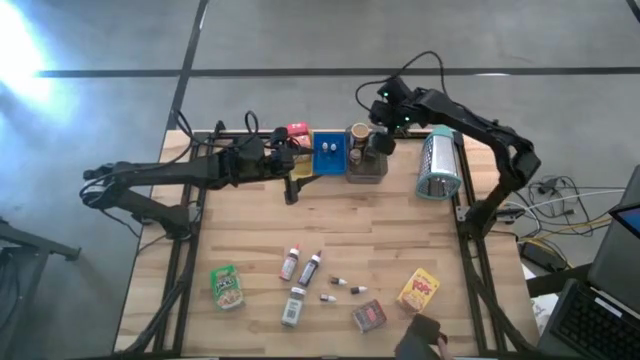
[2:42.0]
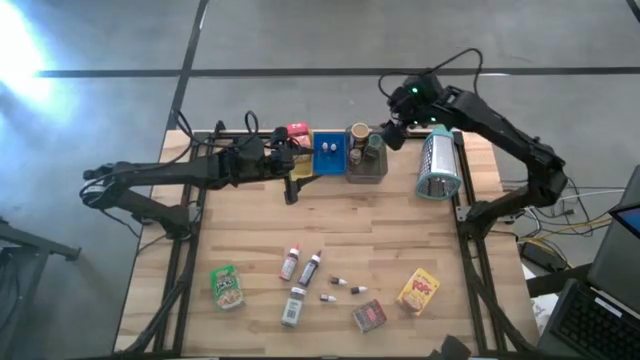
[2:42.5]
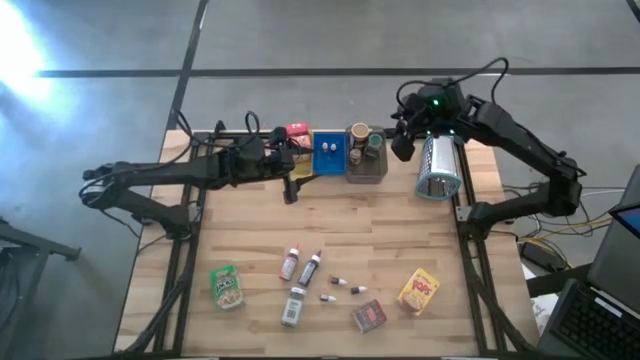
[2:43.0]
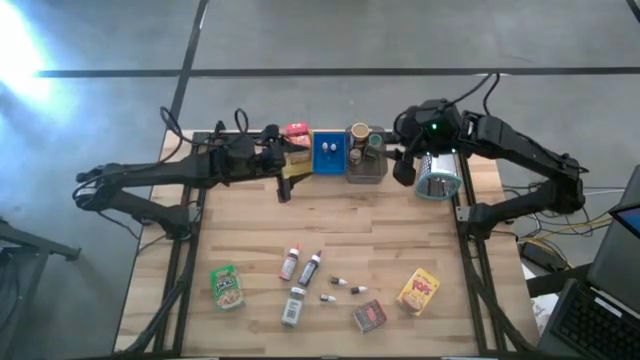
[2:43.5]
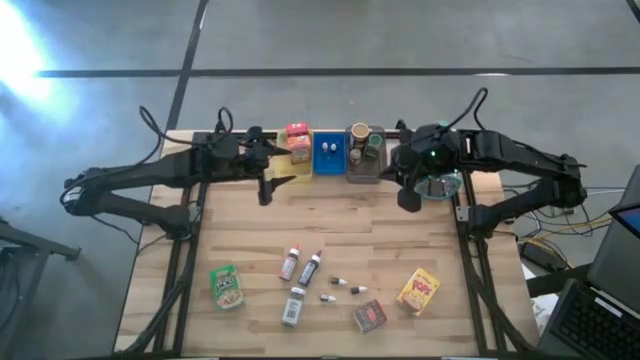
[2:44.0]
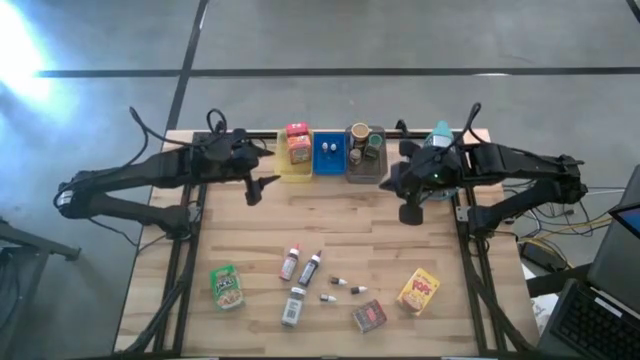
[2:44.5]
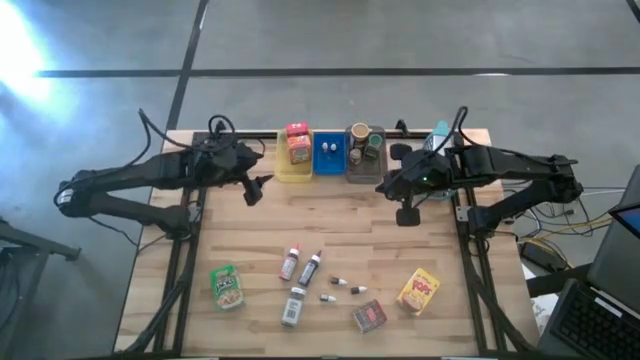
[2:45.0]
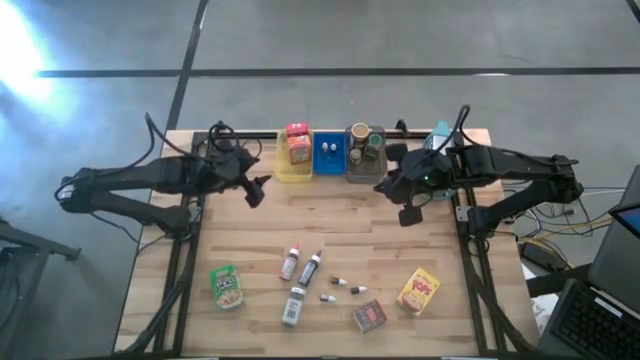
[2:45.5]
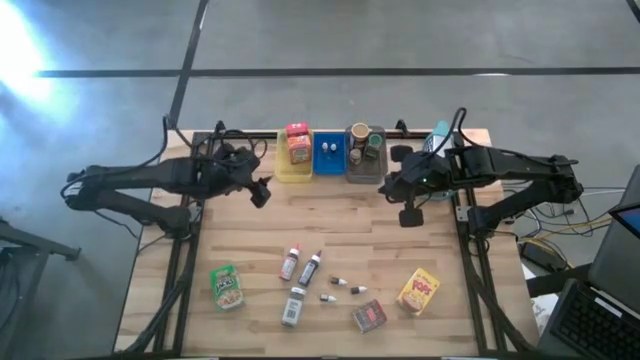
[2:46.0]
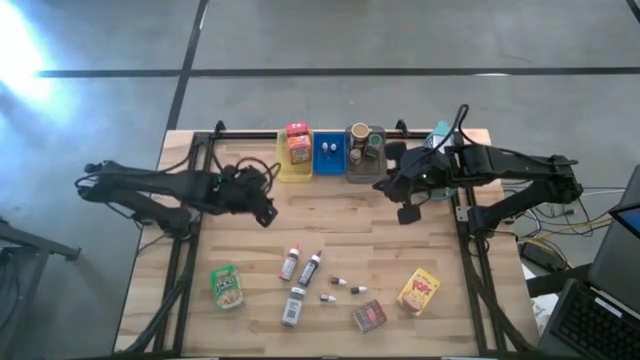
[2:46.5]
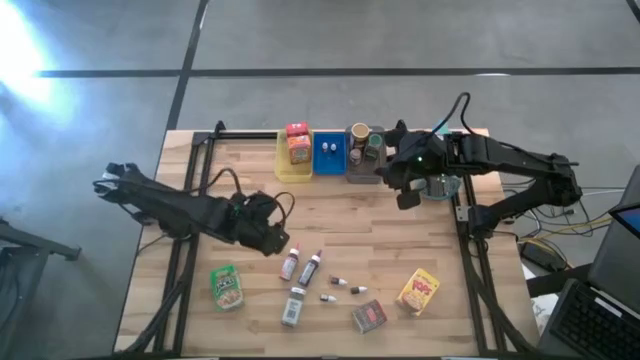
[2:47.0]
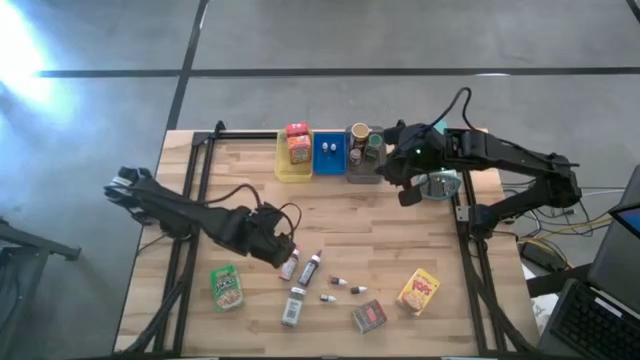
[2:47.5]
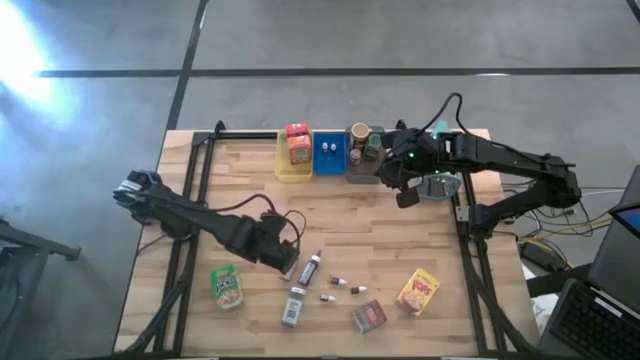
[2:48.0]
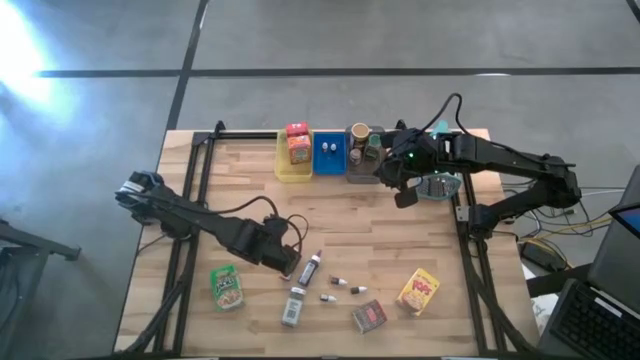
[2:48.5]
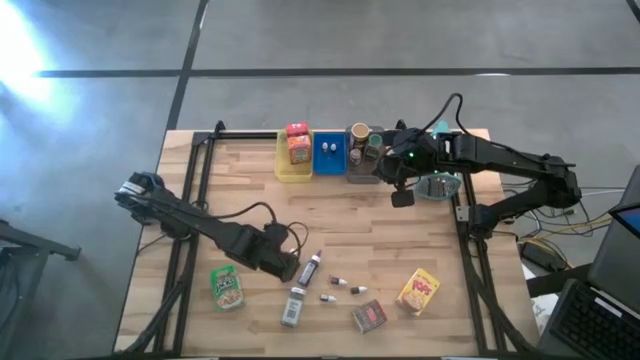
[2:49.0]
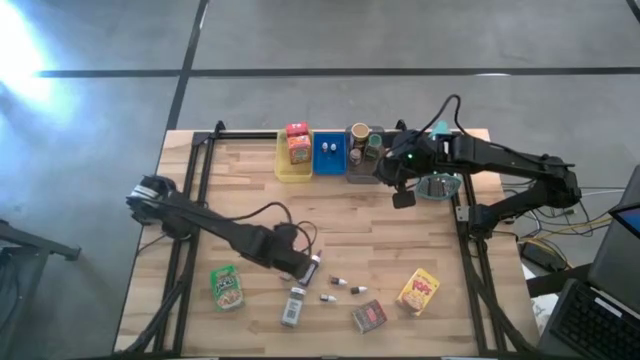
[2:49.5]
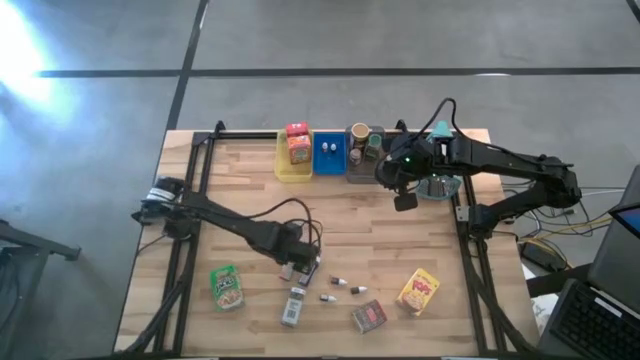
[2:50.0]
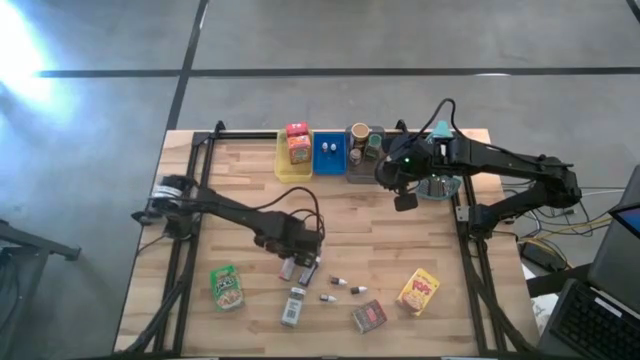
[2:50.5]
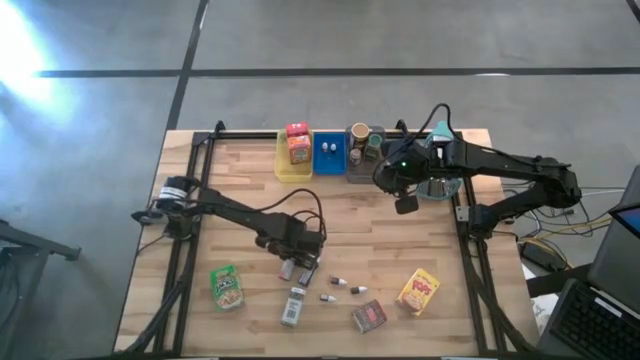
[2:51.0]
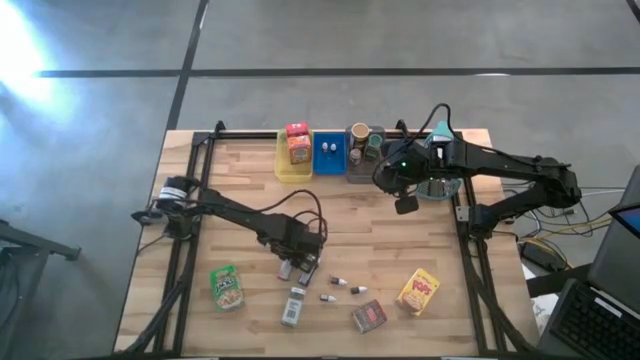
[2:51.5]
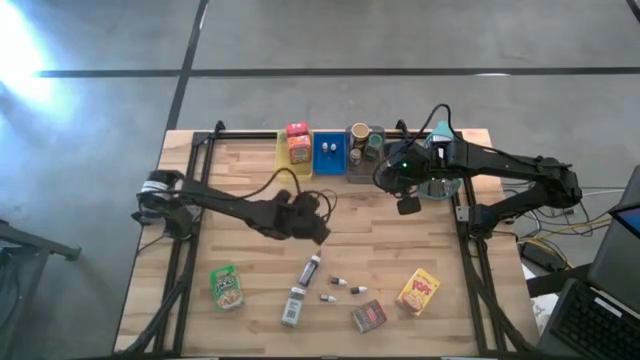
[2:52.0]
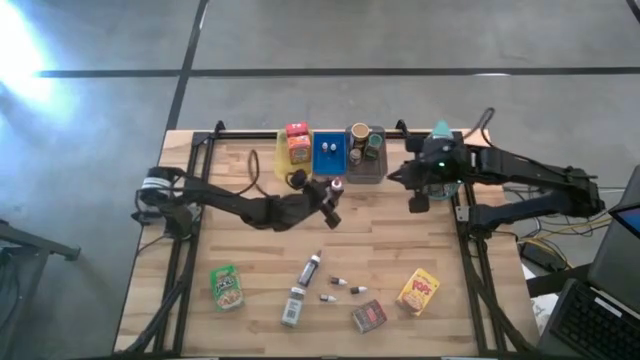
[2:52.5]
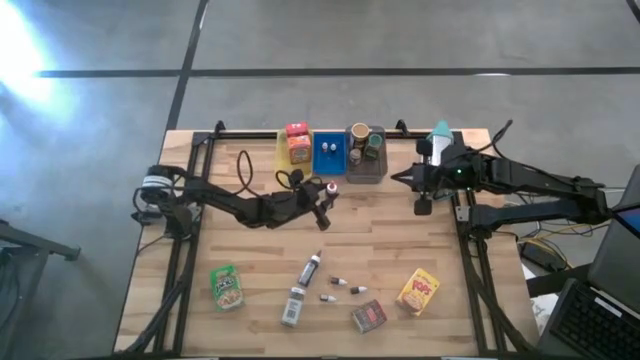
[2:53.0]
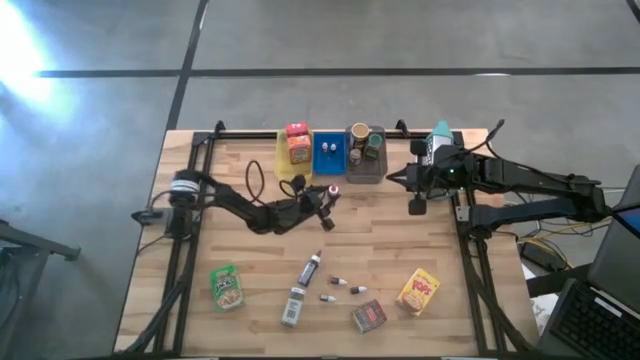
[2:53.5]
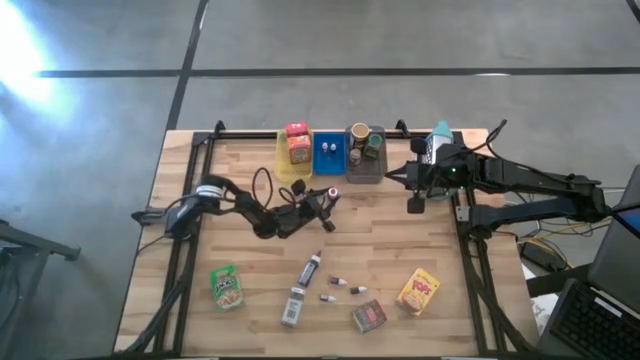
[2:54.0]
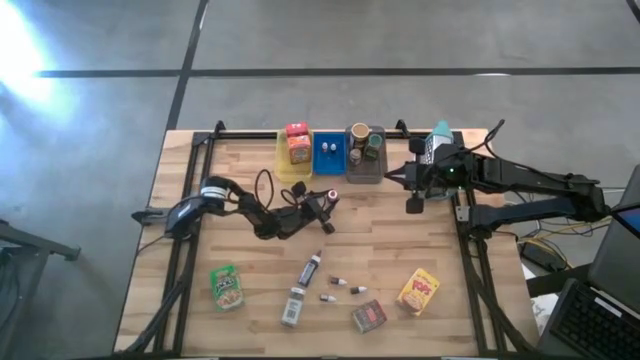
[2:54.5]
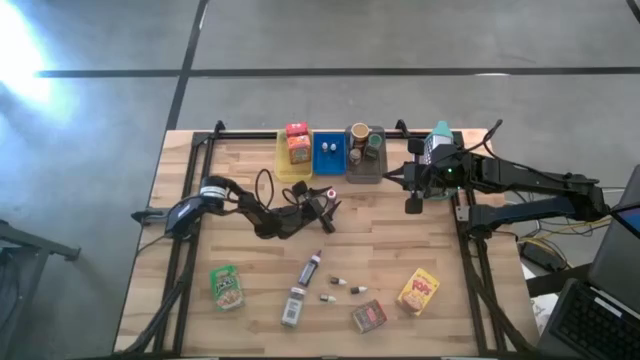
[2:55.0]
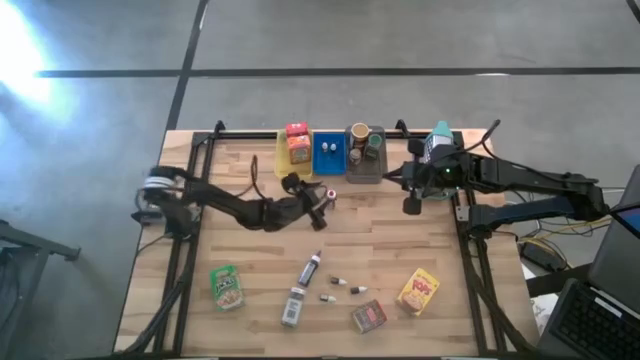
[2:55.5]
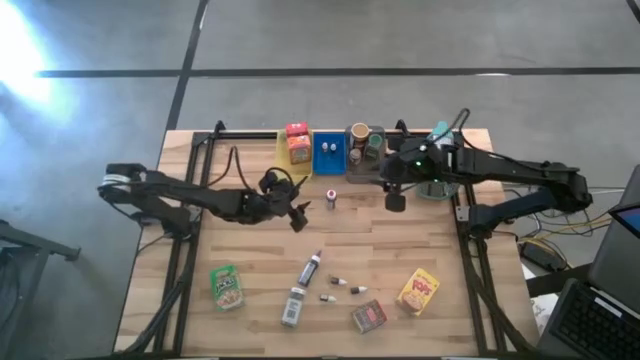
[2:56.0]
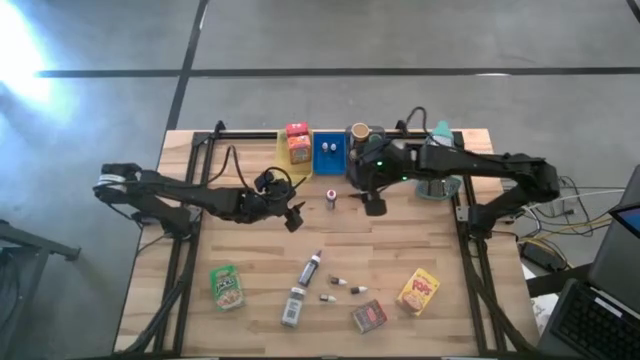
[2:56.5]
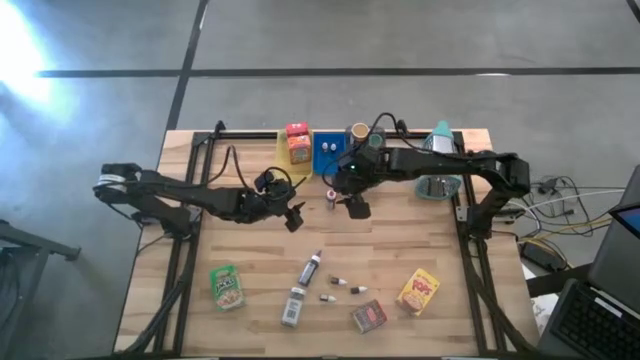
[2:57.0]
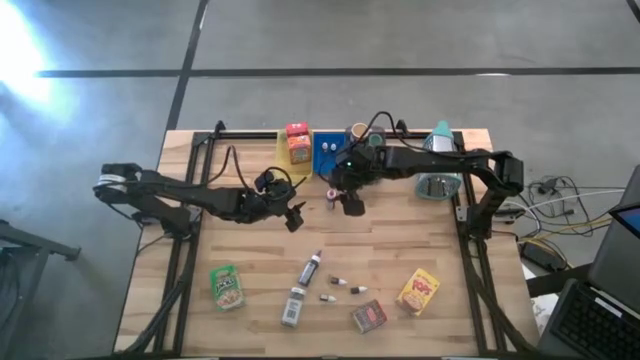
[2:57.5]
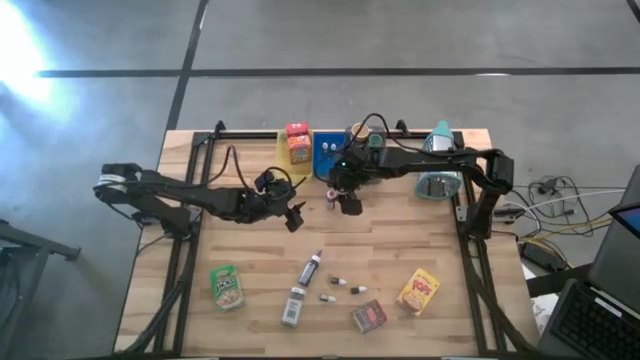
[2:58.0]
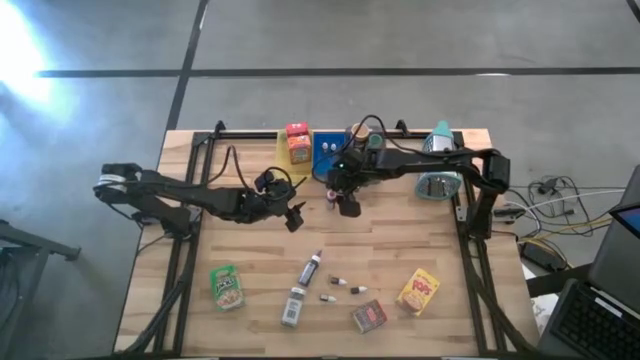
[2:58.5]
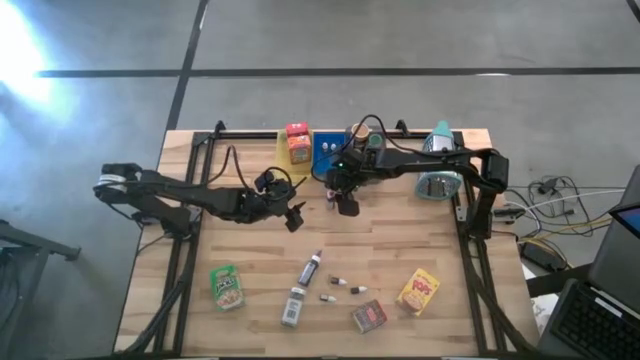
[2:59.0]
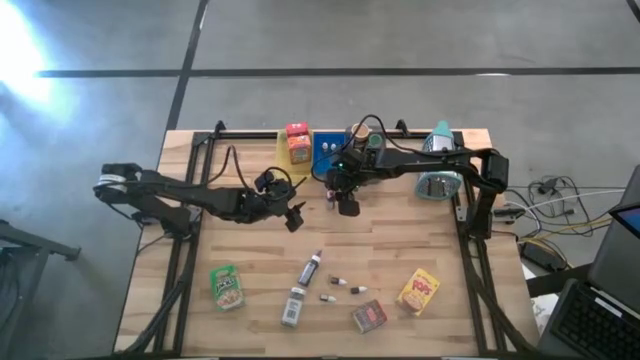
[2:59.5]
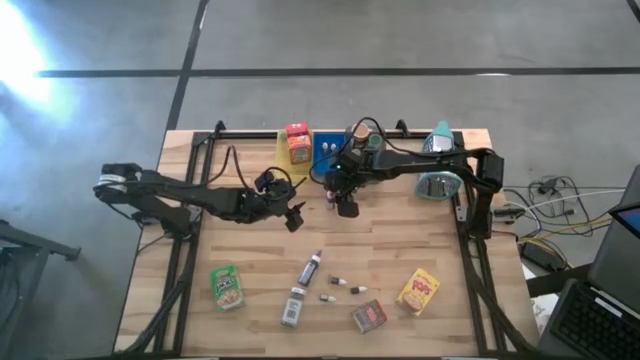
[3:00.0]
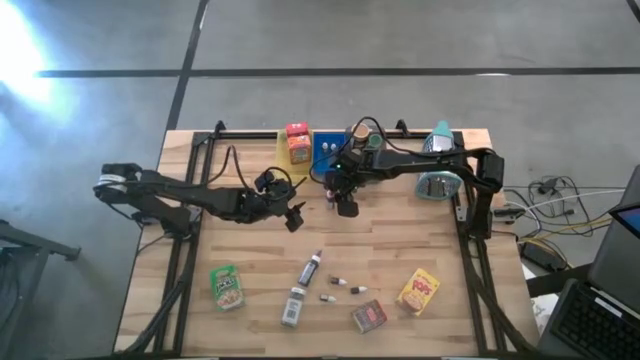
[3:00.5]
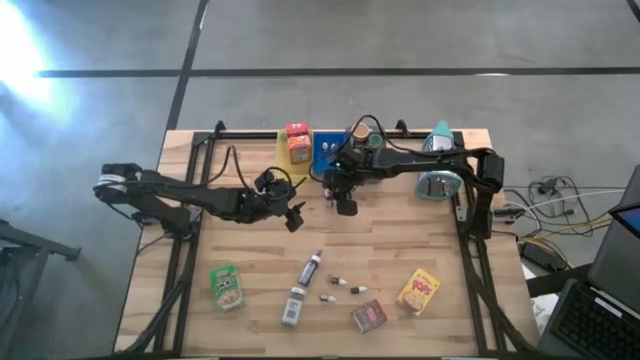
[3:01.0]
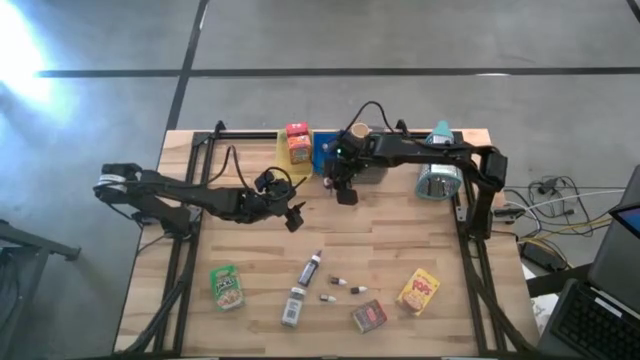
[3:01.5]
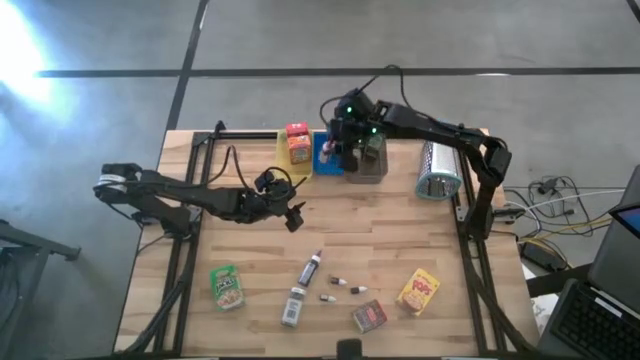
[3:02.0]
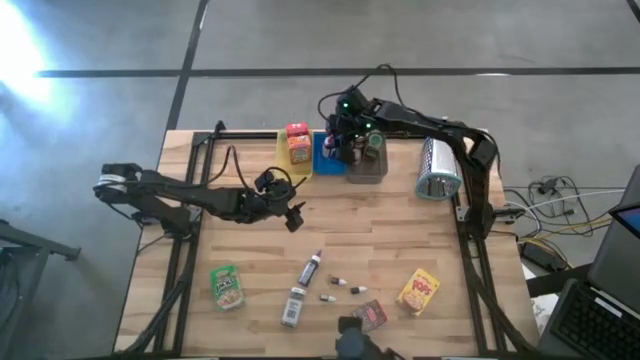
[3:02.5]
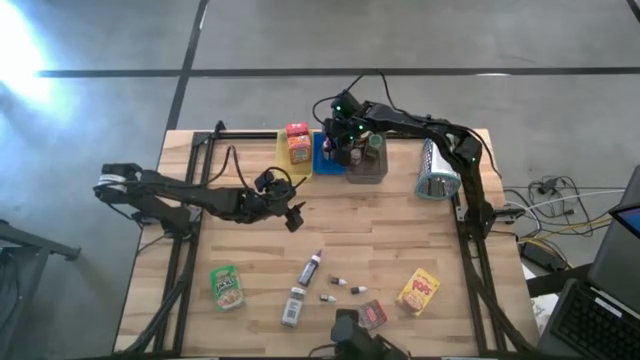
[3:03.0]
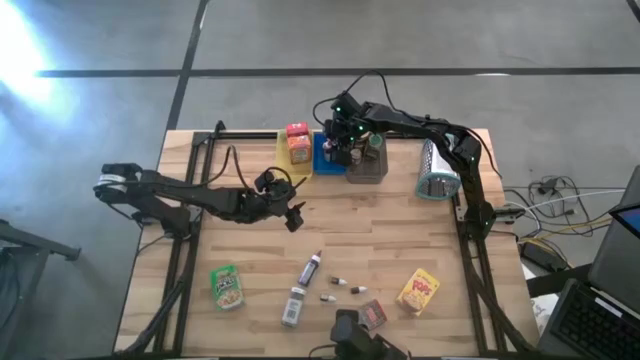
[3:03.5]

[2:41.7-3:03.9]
Task: Pick & Place Kitchen Items
Put the large pink food coloring bottle into the blue bin
